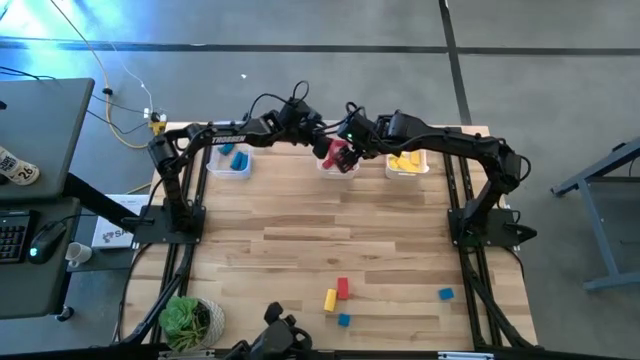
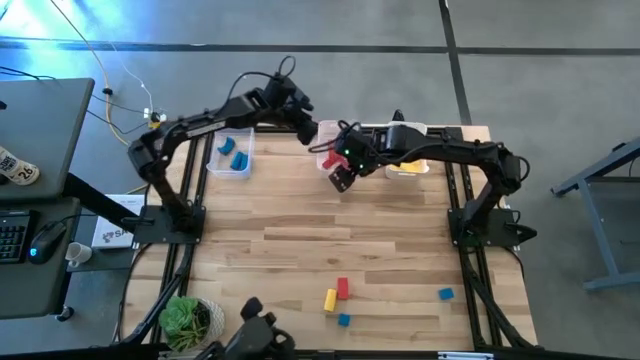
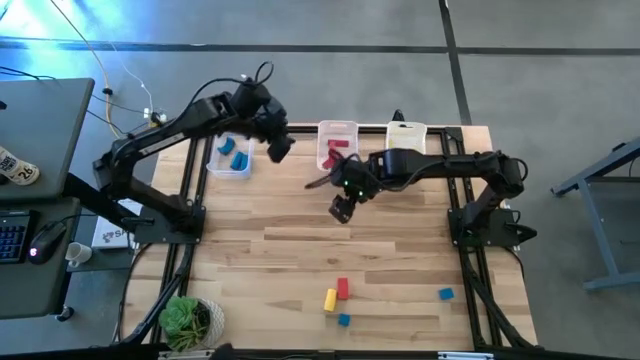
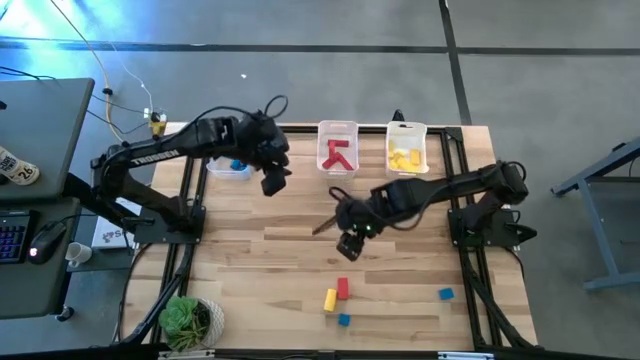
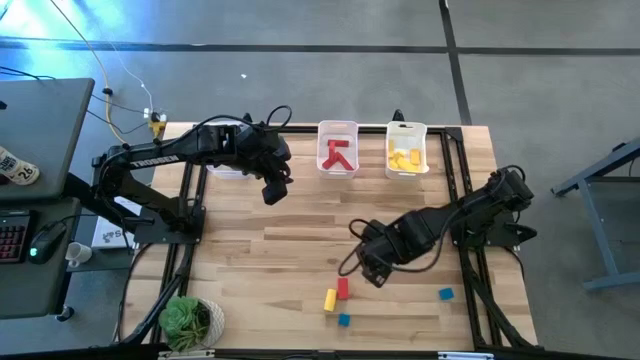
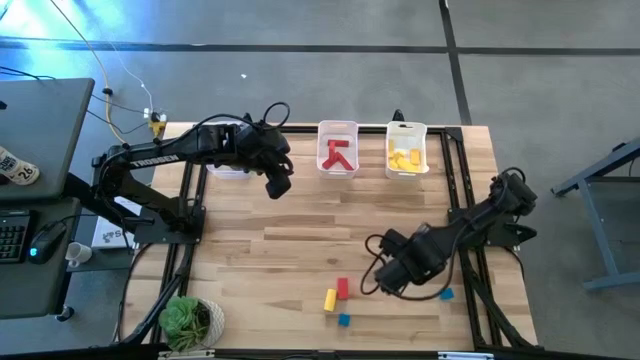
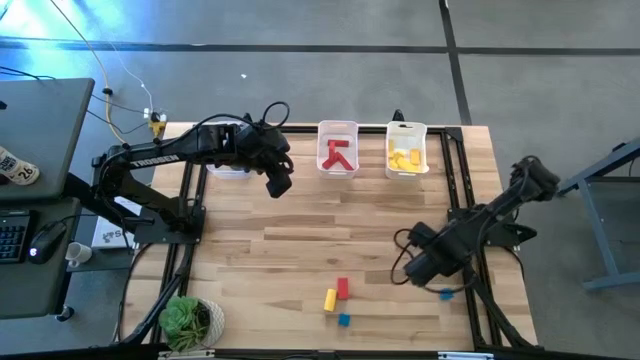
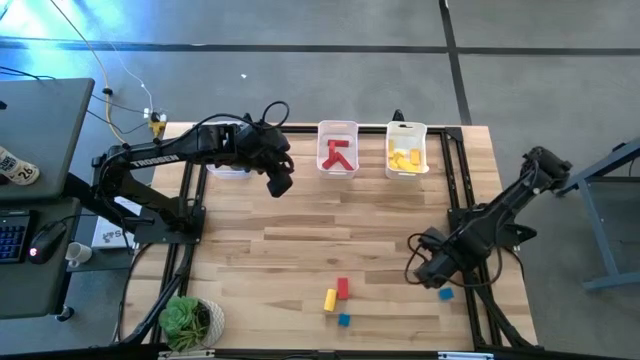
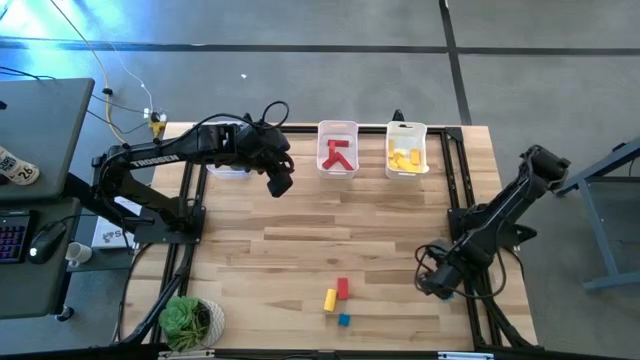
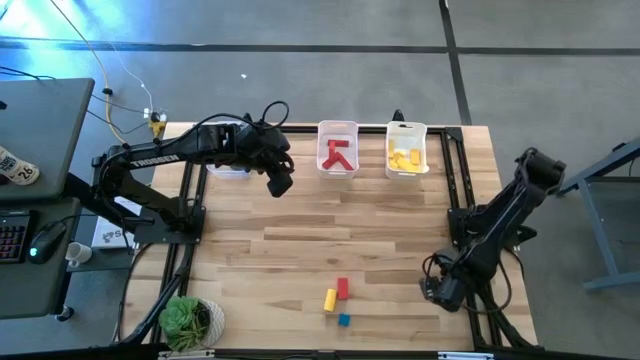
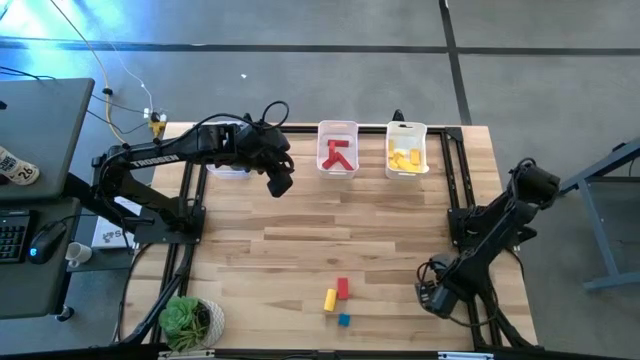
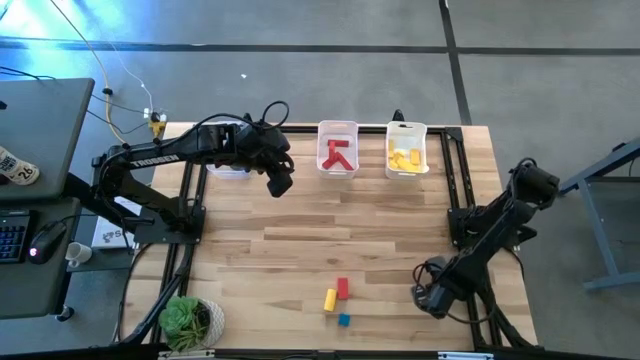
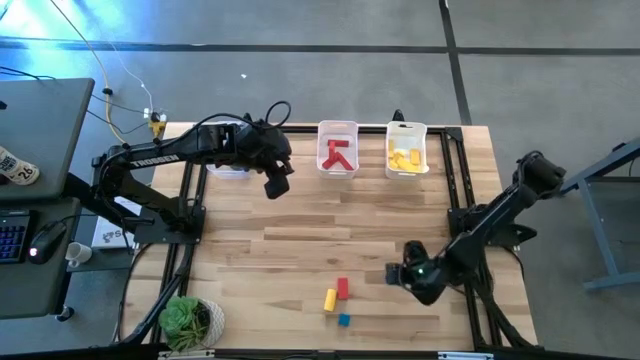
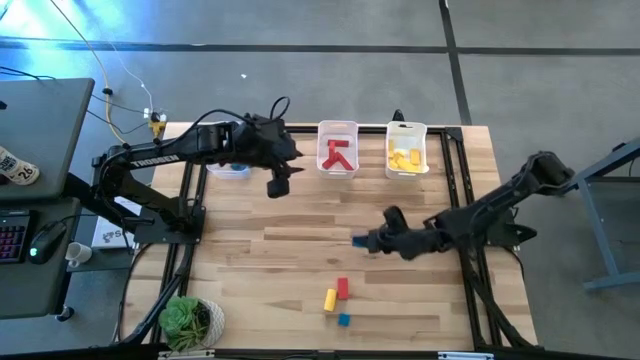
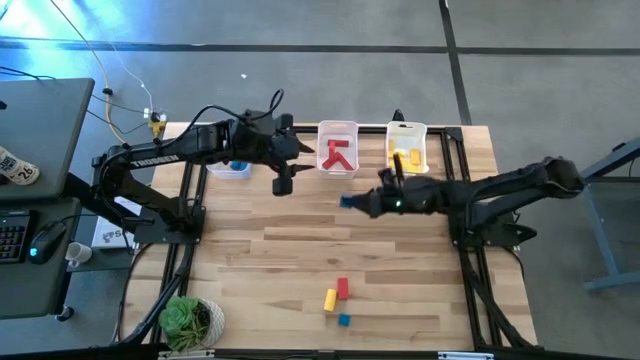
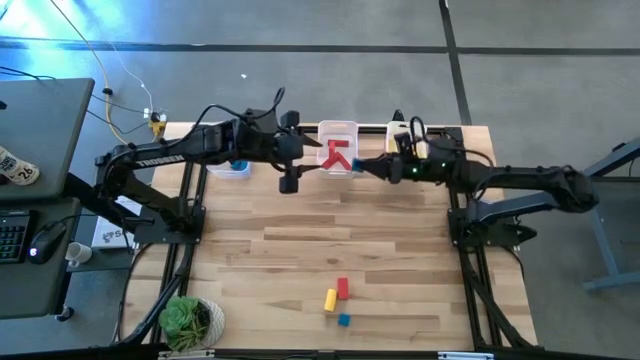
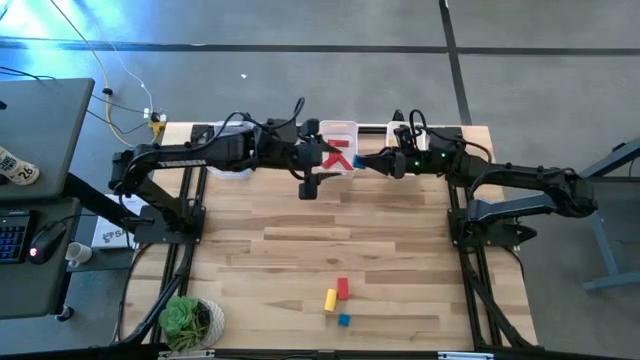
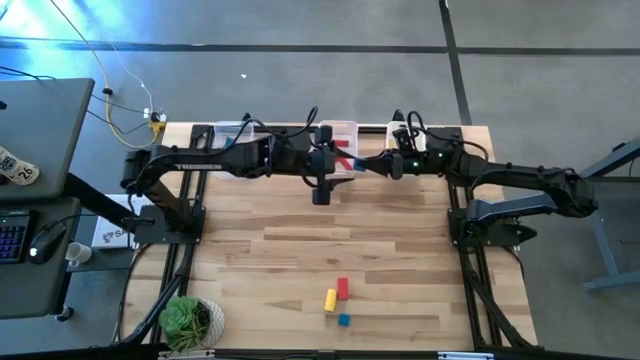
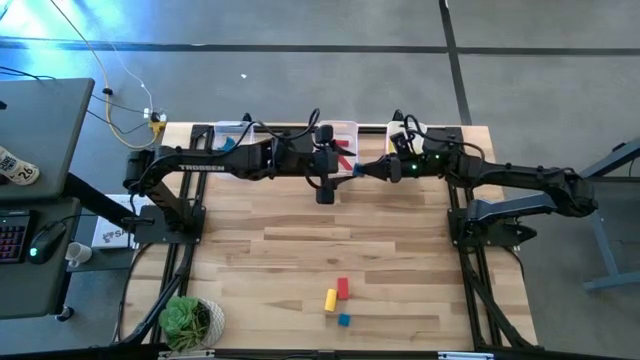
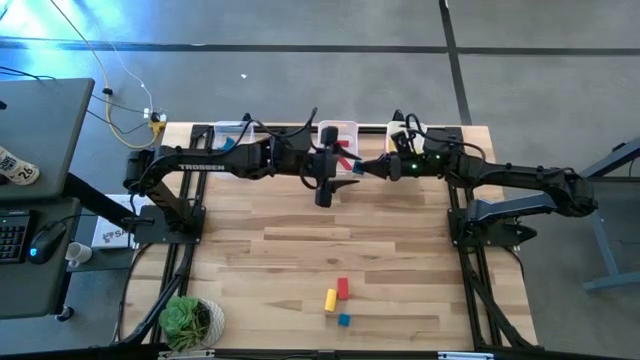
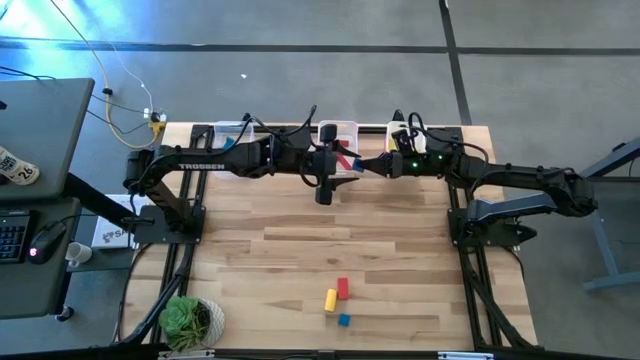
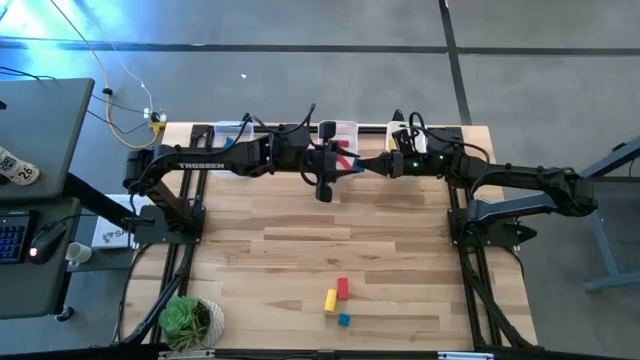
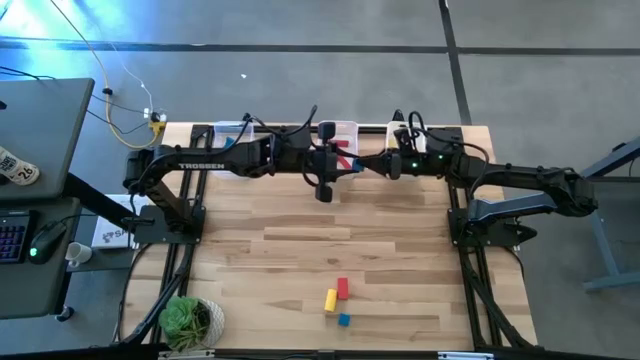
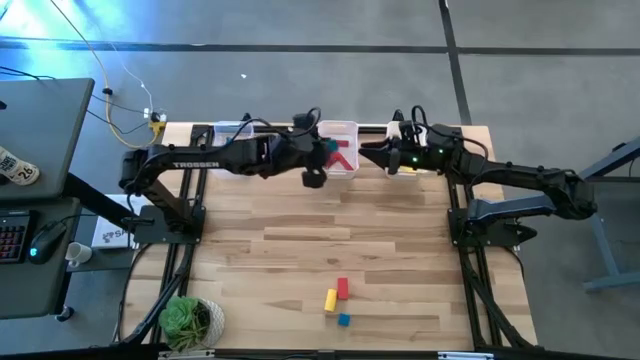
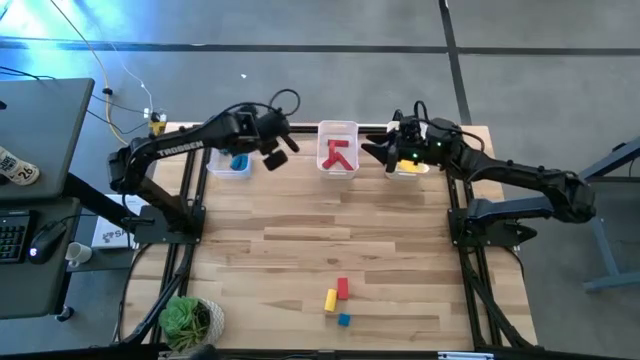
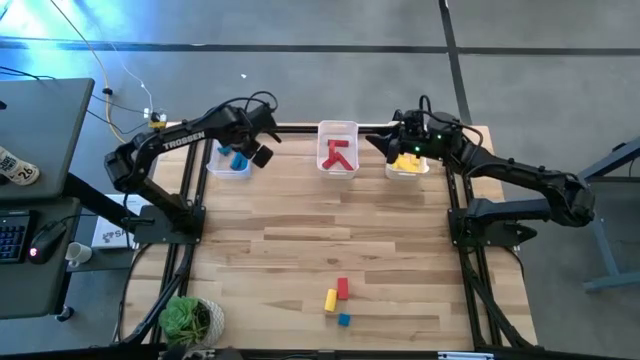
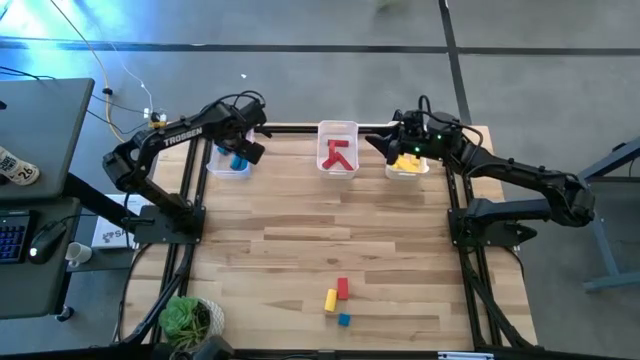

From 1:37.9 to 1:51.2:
Task: Sort & place blocks by color
Put the blue block into the transparent bin

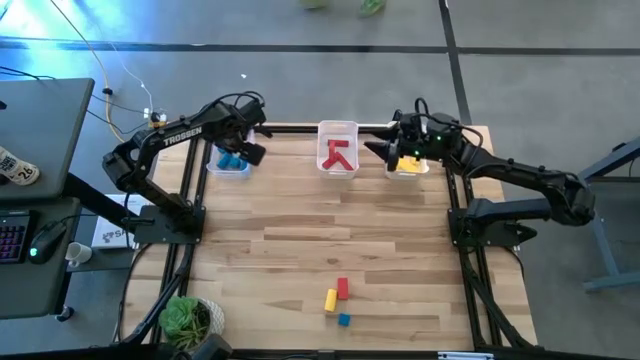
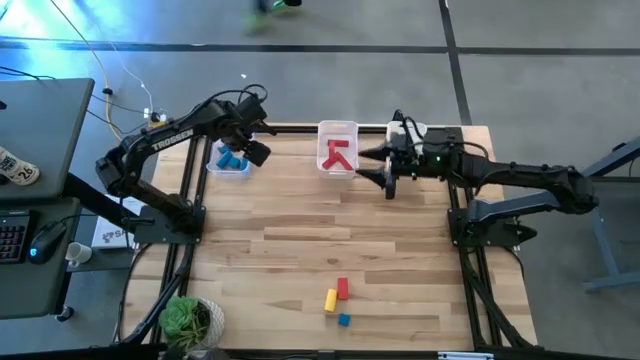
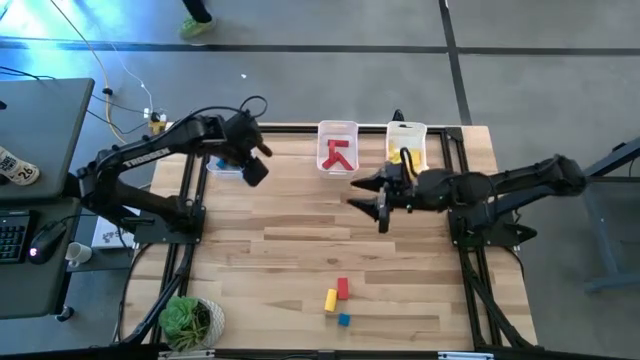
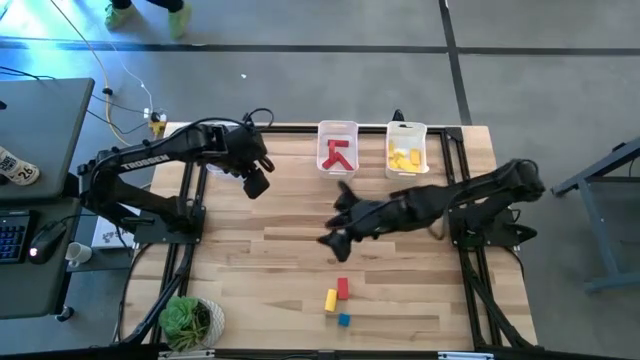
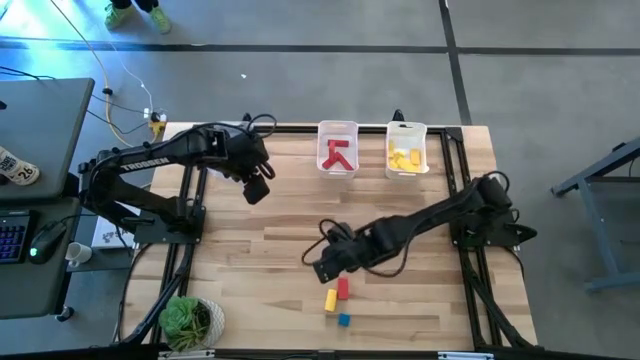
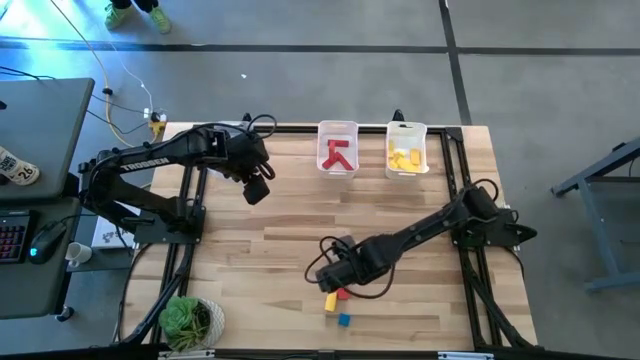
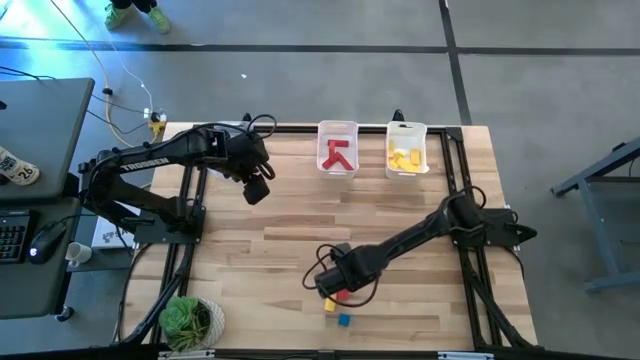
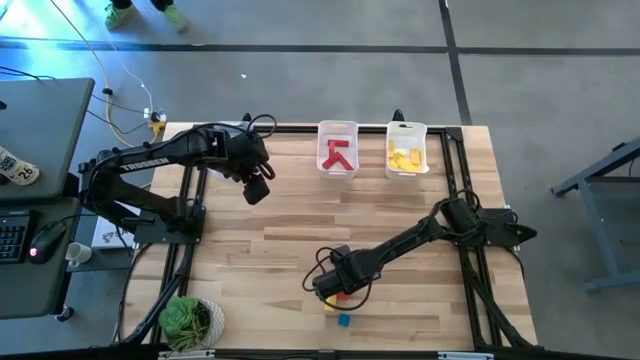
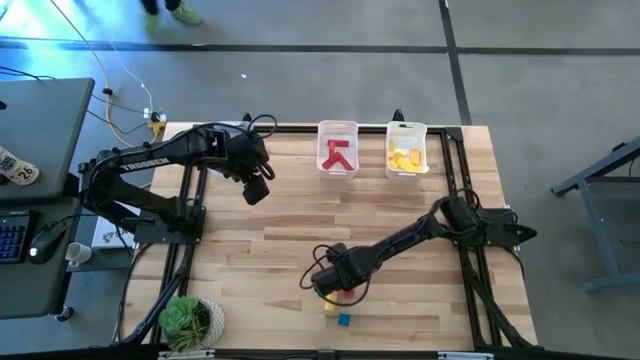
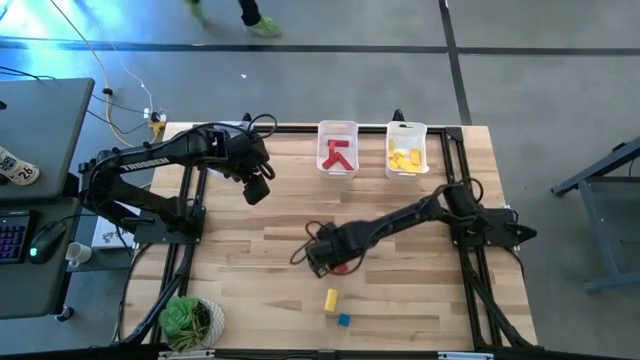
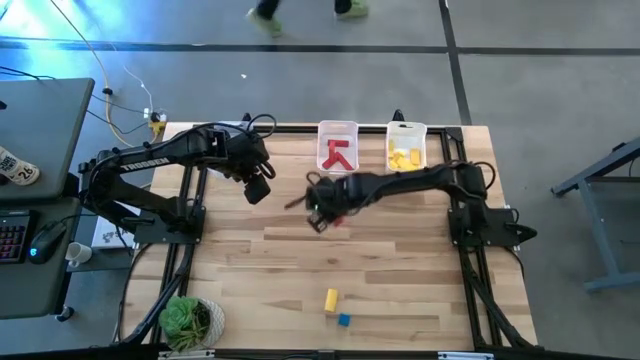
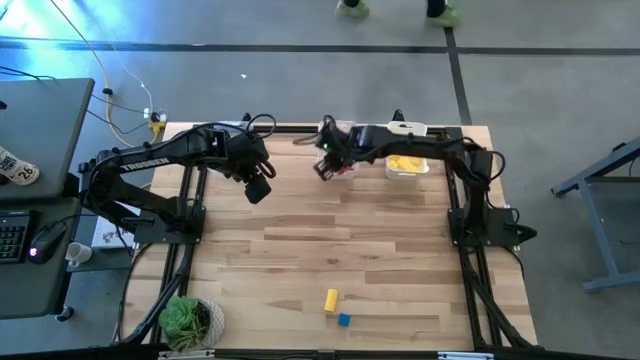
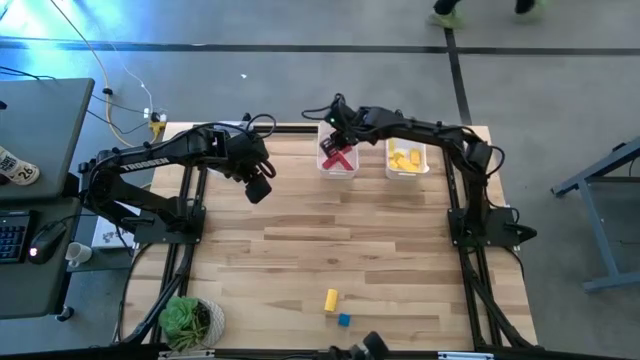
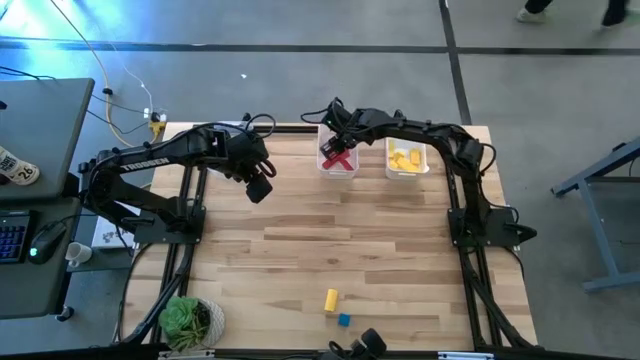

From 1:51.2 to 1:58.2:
Put the red block into the left white bin

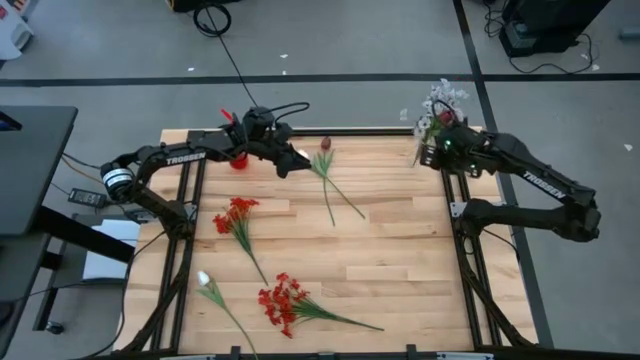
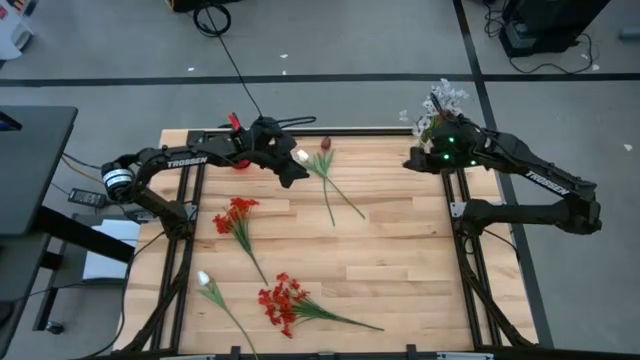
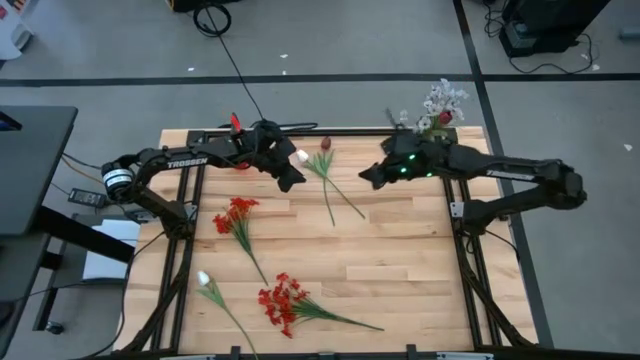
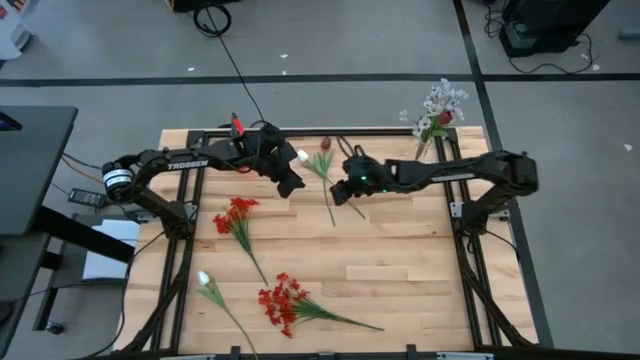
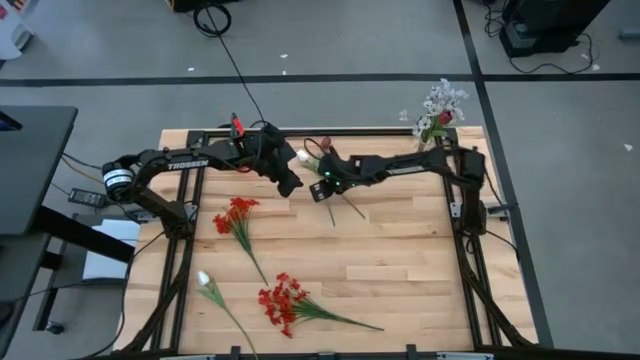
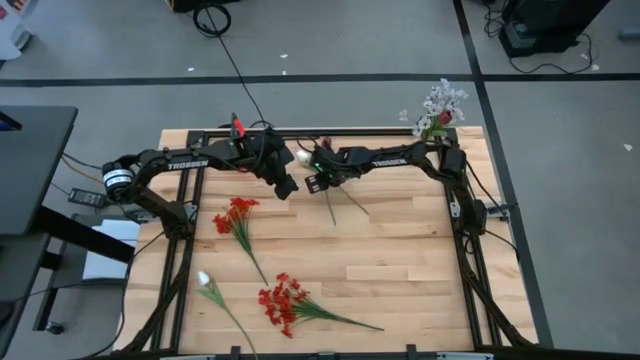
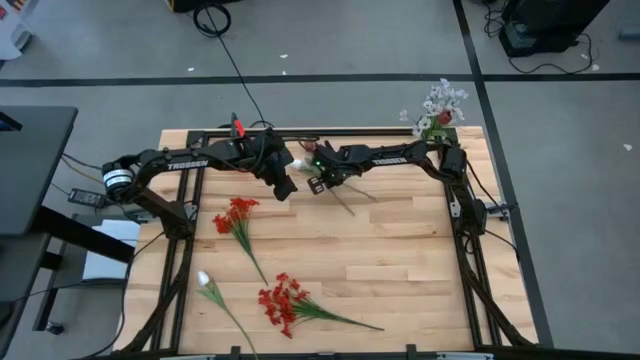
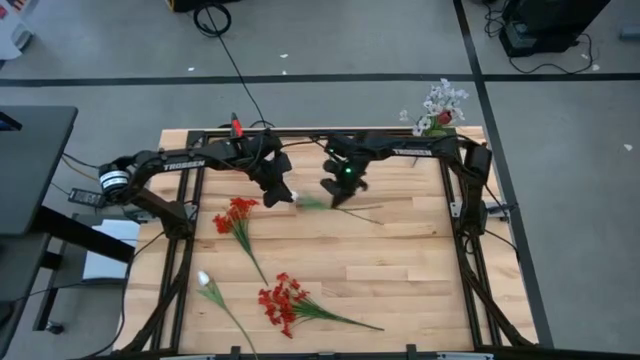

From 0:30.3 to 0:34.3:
Task: Sort flowers into vase by color
Put the dark red flower into the transparent vase
